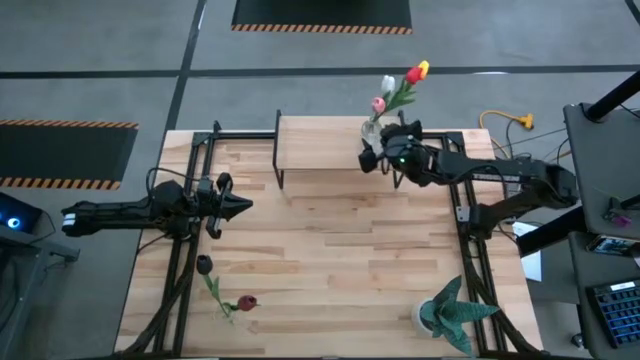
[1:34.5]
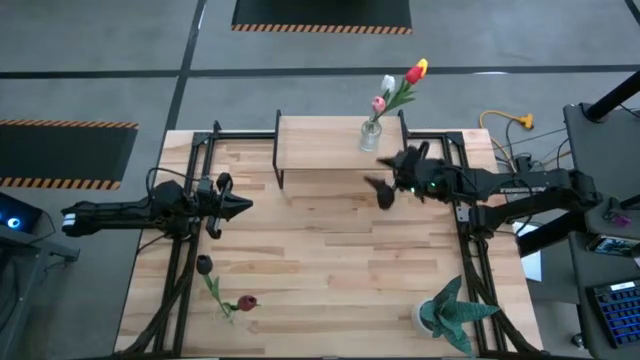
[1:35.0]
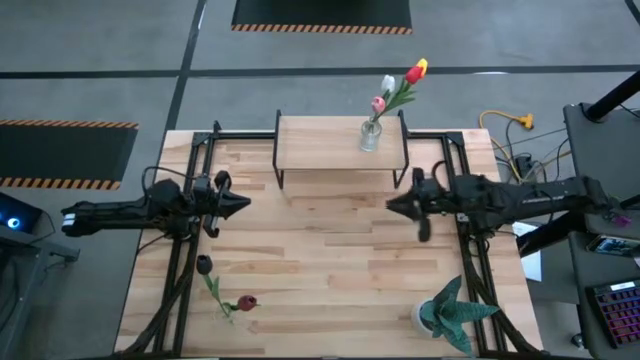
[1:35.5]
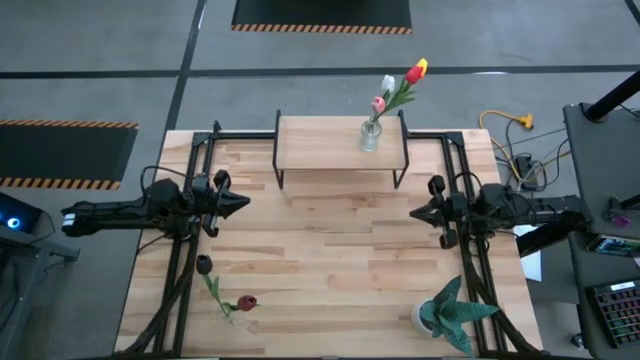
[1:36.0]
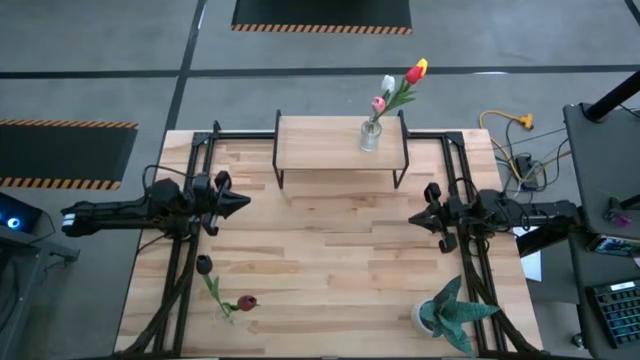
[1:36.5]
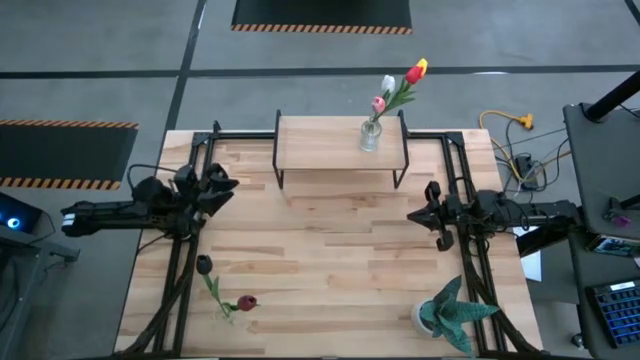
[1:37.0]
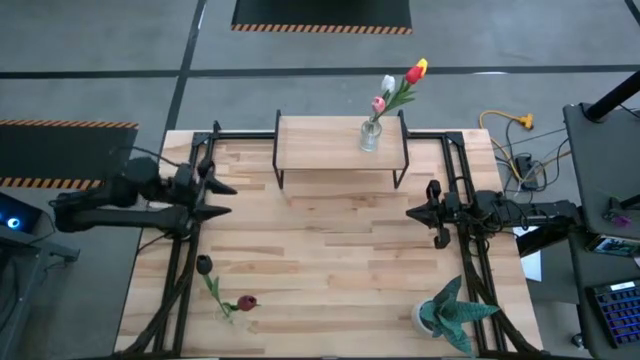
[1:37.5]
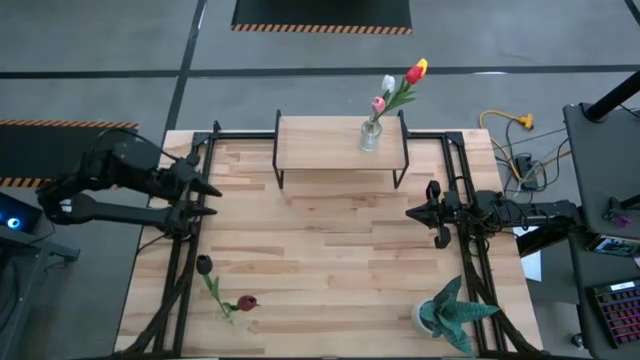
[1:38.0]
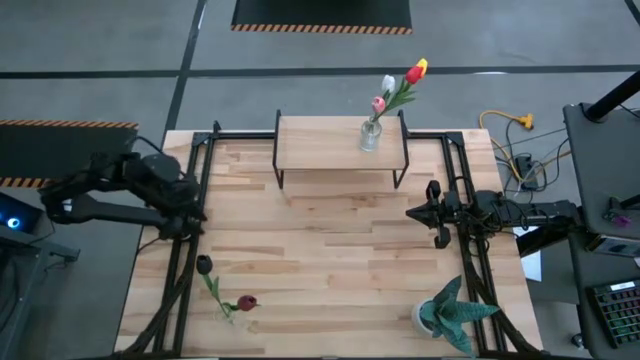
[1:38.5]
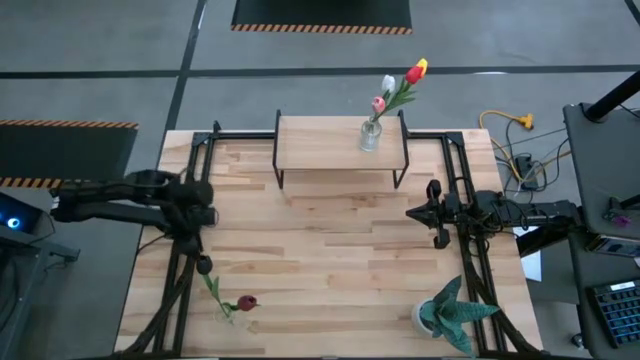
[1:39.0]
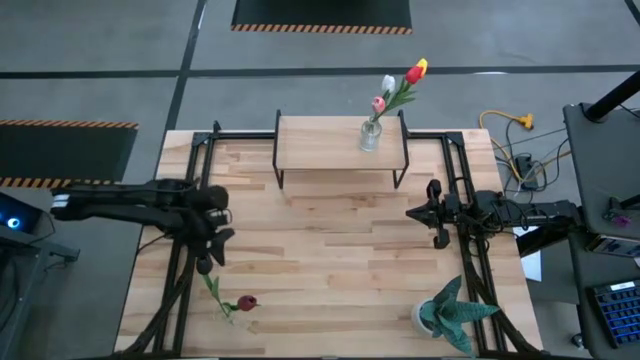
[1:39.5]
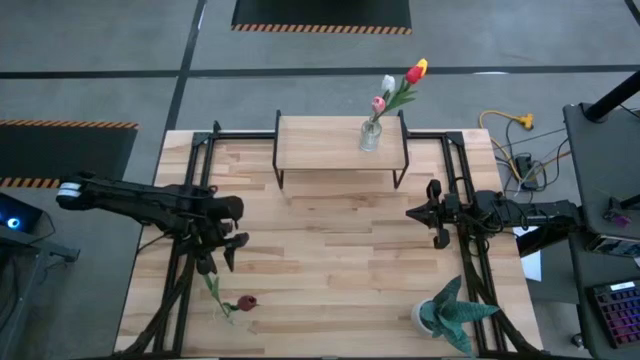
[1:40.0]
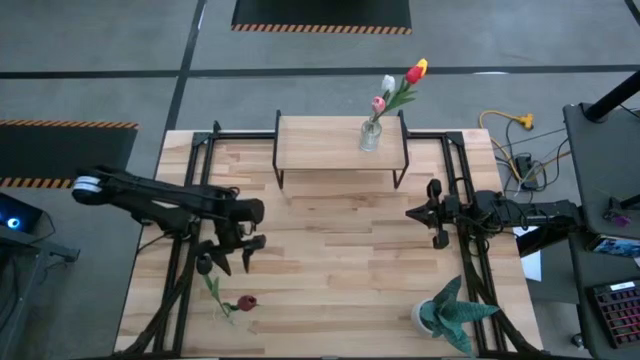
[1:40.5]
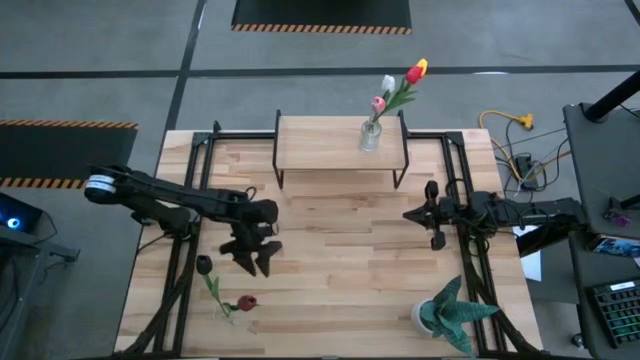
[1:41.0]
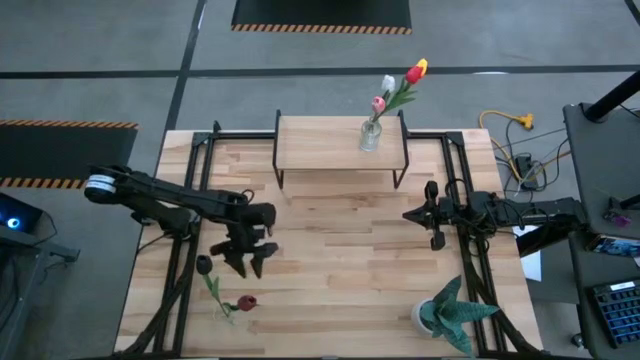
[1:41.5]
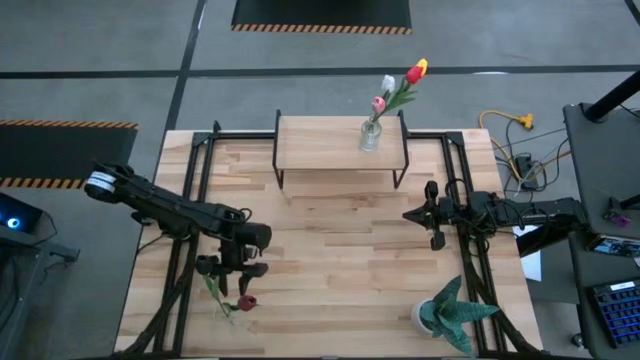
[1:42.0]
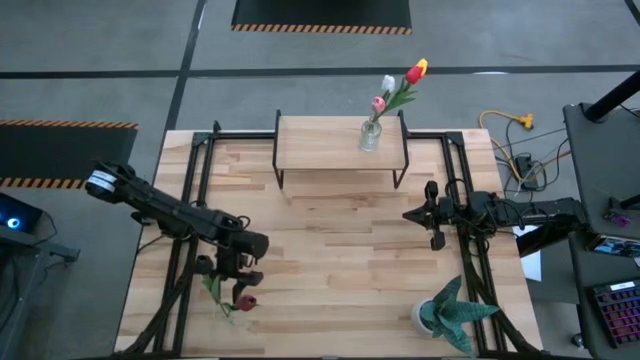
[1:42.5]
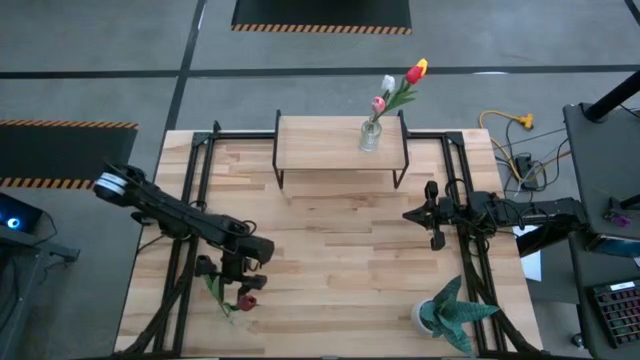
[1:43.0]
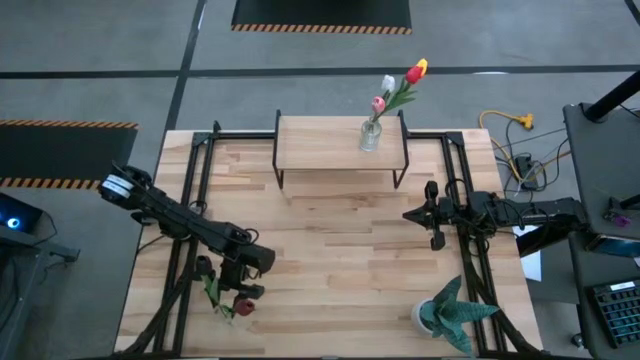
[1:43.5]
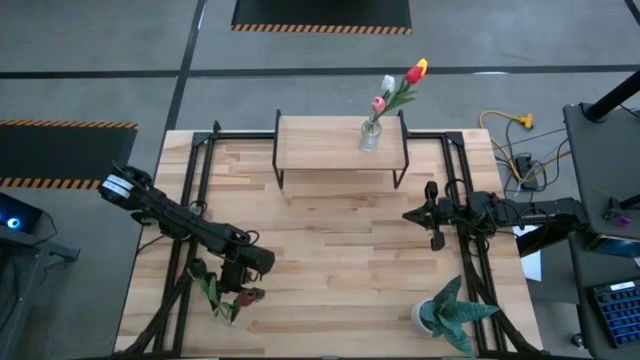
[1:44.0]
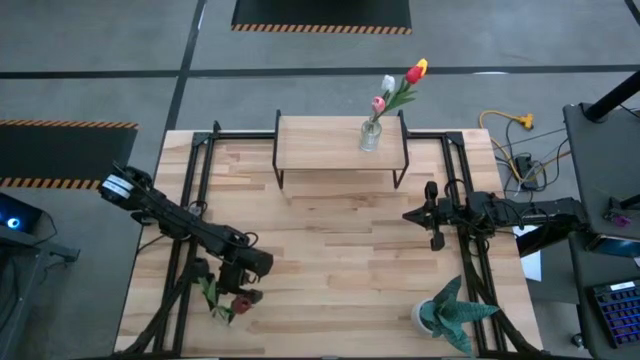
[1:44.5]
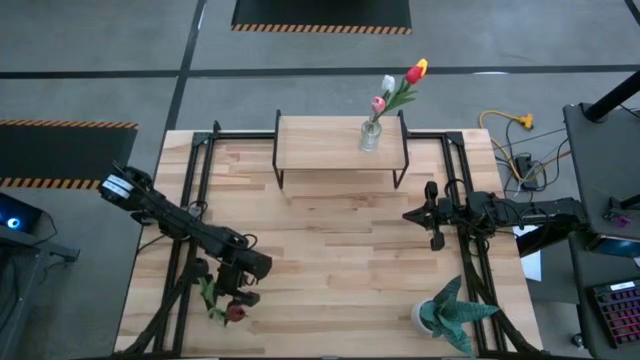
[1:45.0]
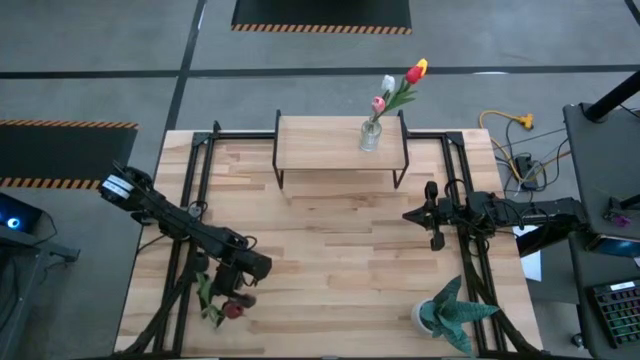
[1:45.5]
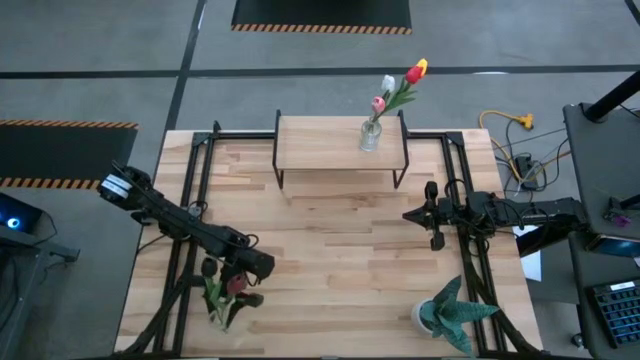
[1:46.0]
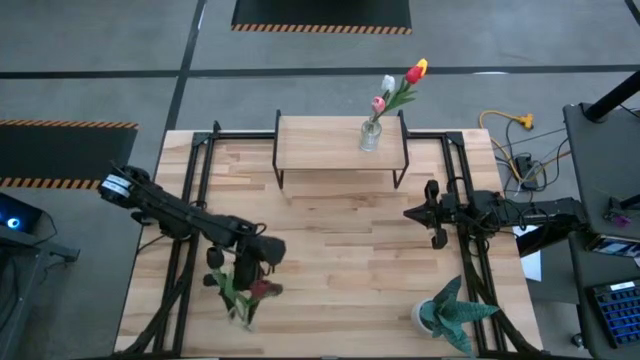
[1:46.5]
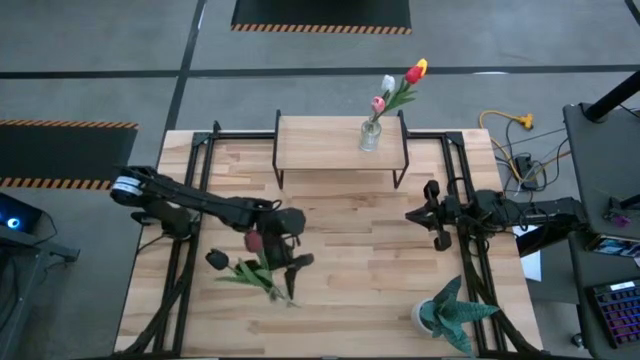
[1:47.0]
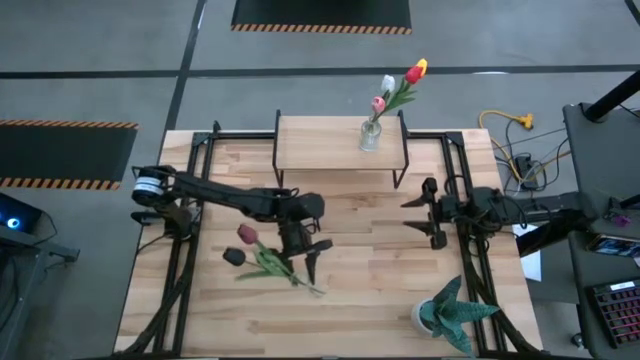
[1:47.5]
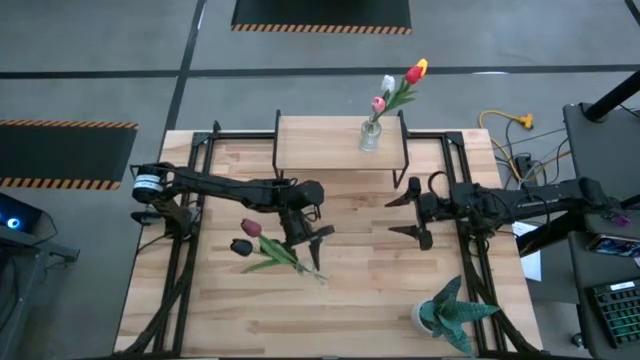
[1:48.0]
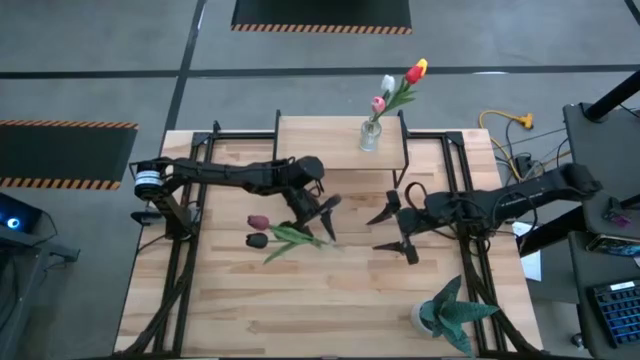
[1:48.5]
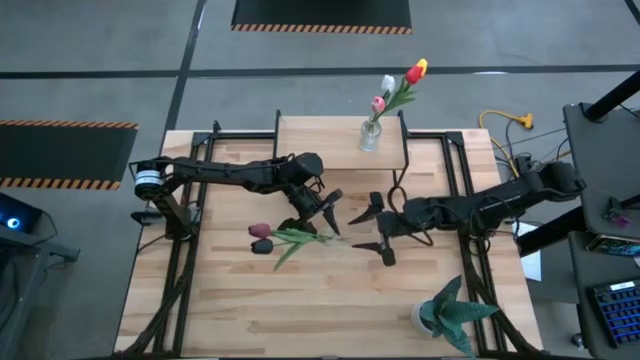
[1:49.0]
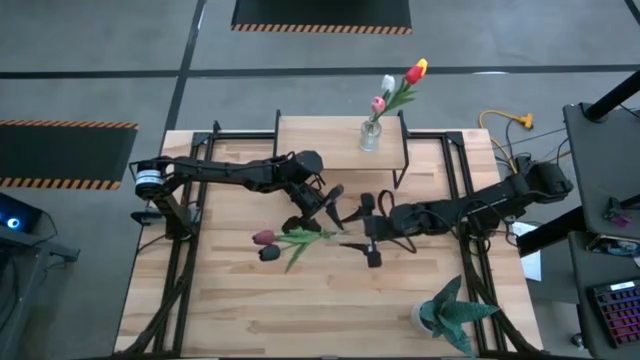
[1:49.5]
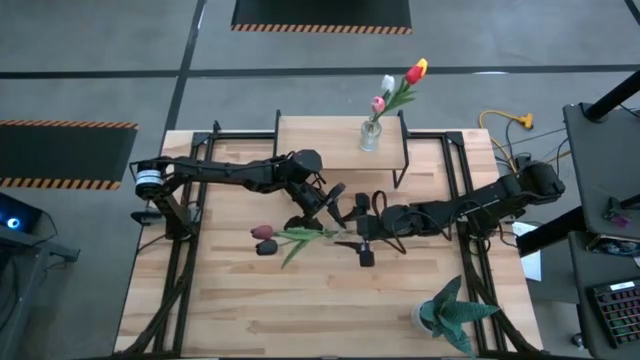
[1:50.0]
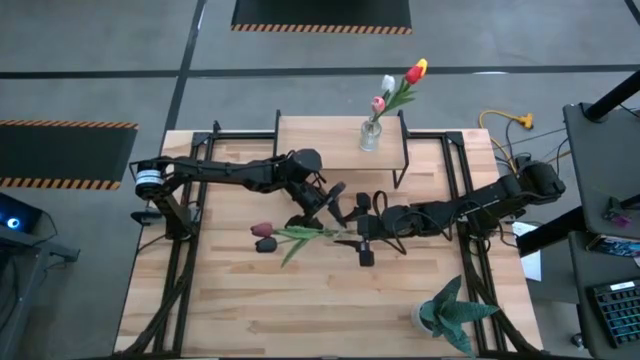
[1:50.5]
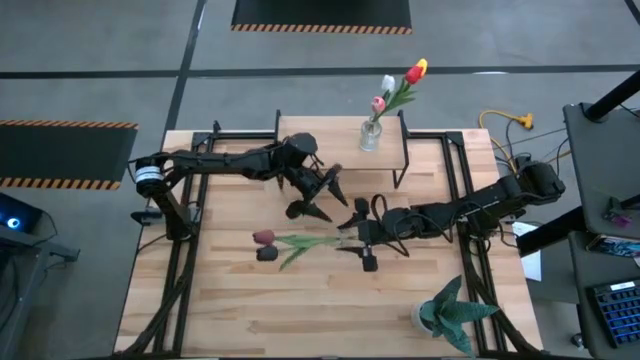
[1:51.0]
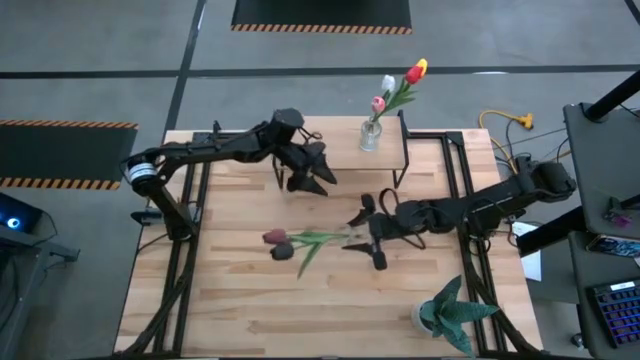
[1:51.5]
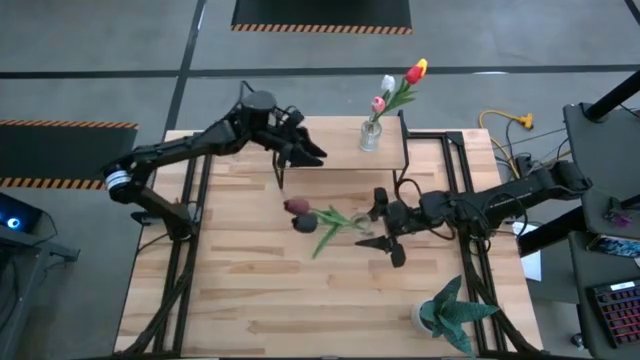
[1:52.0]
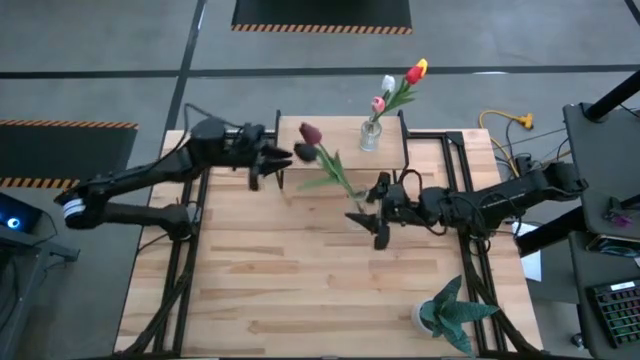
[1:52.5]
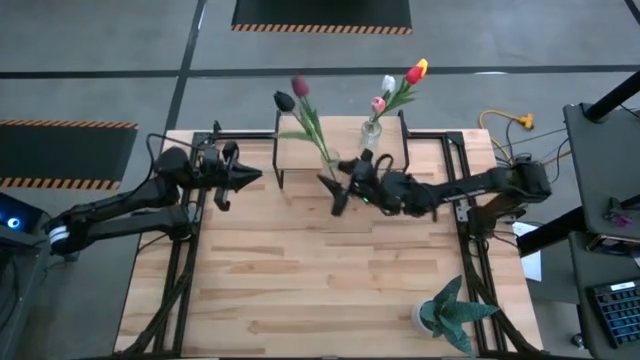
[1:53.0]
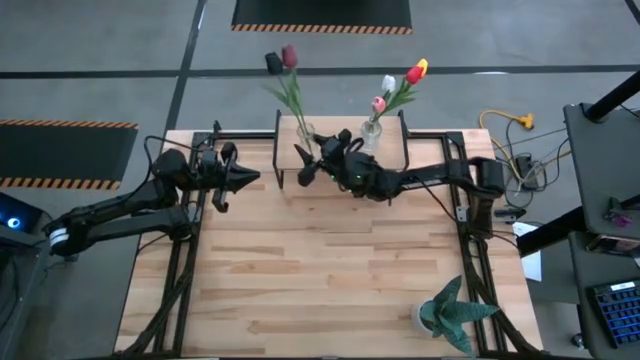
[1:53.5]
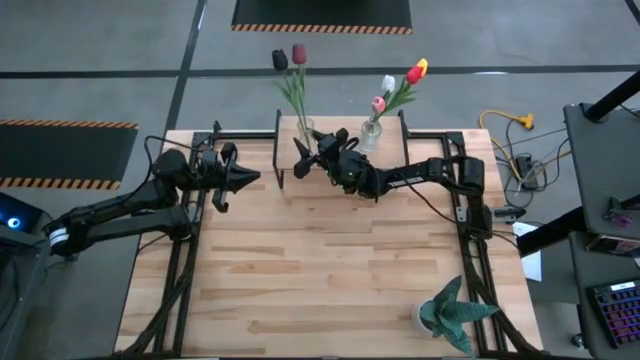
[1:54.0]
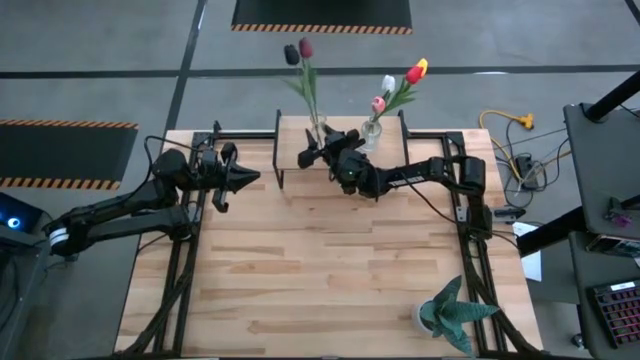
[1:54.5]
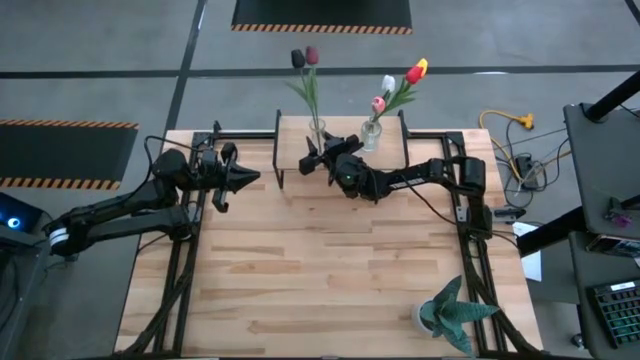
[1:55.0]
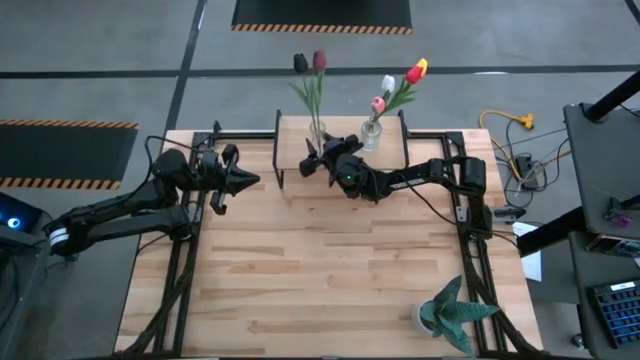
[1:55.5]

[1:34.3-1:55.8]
Task: Pick and place flowers into a vace then onto a shelf
Put the transparent vase with the tulips on the shelf
